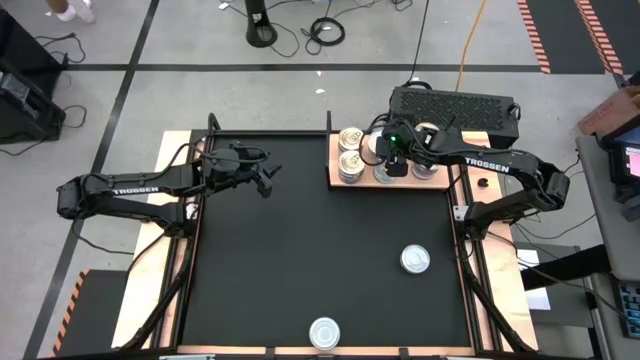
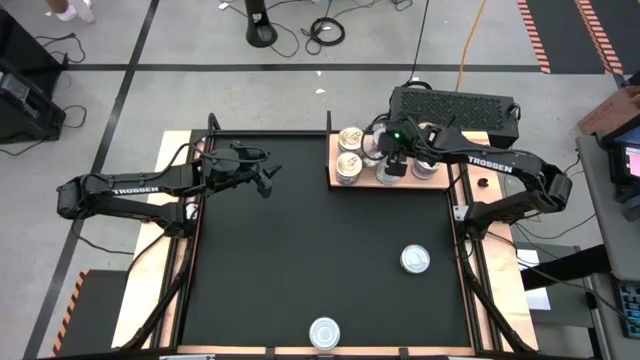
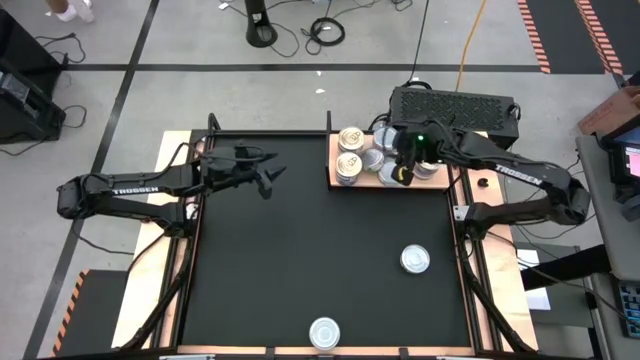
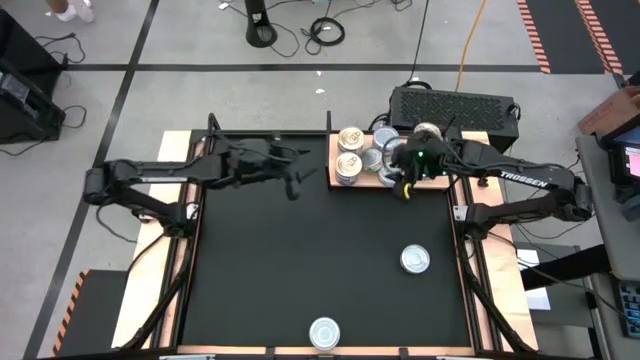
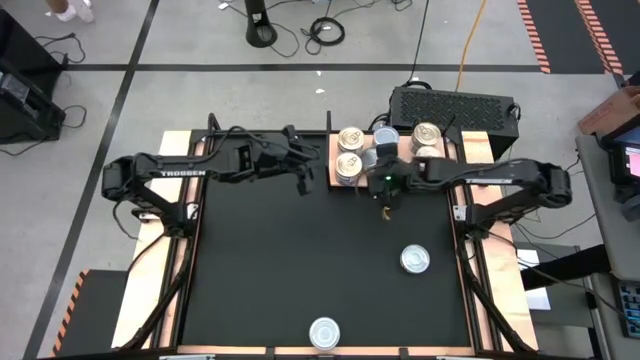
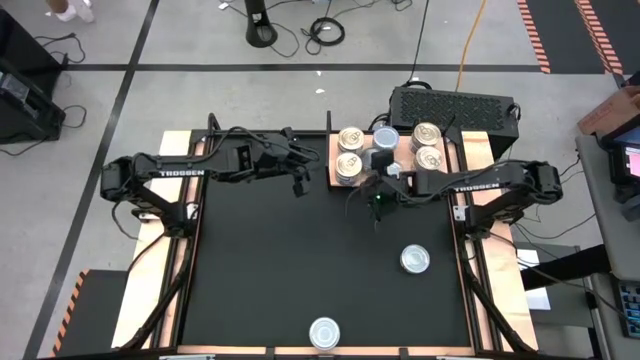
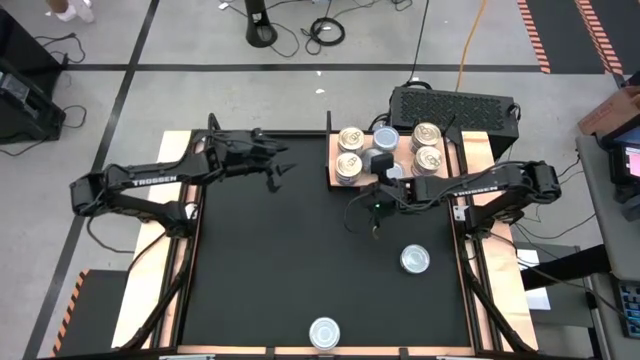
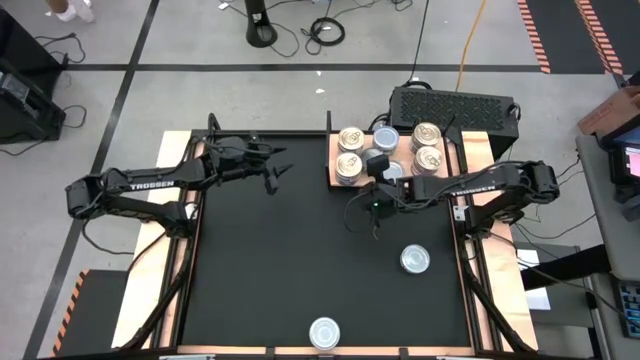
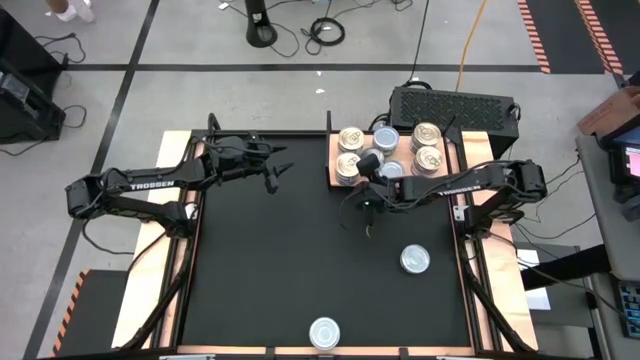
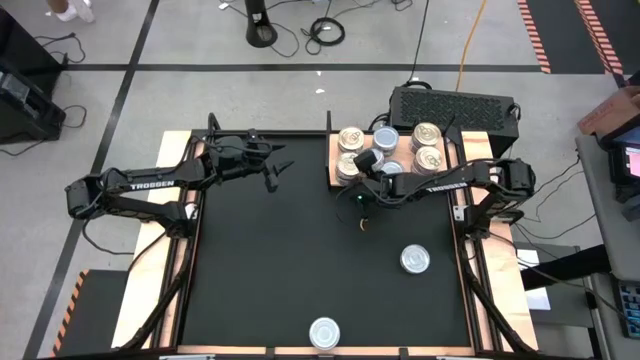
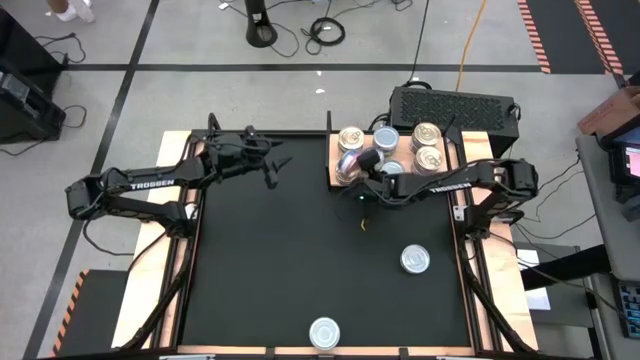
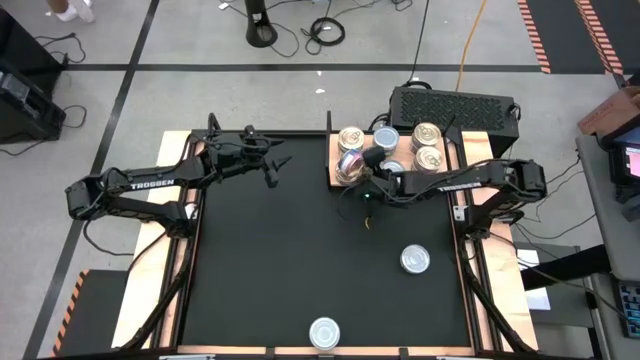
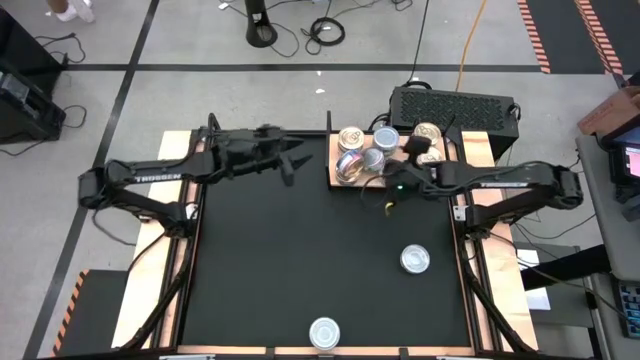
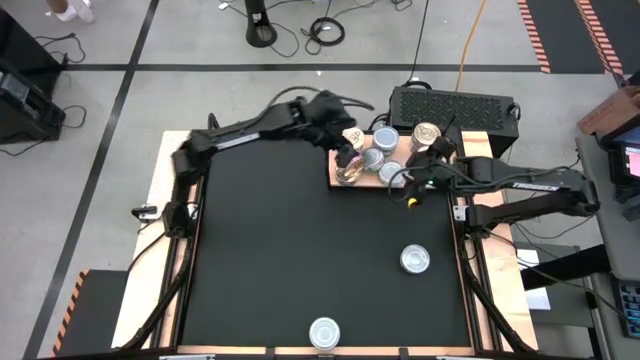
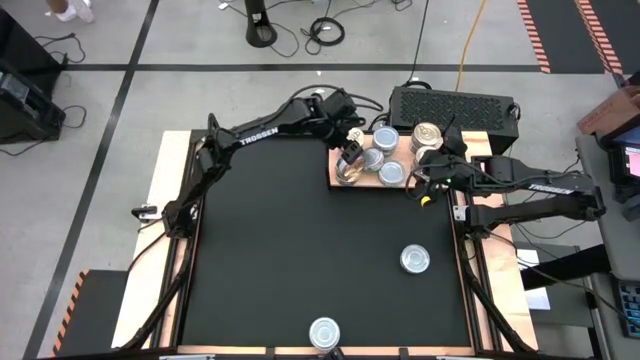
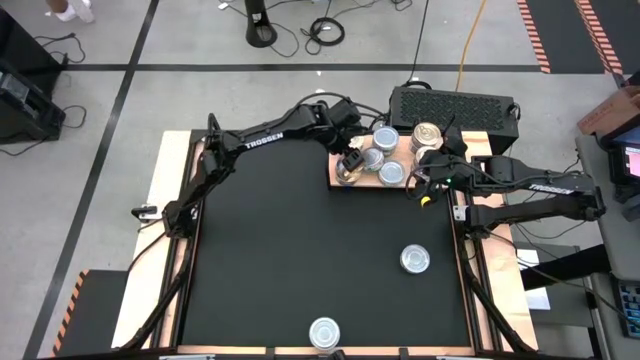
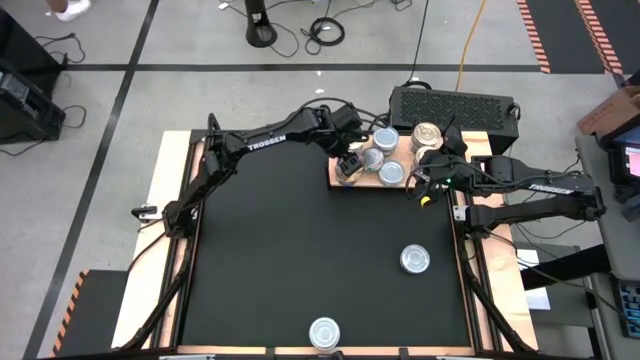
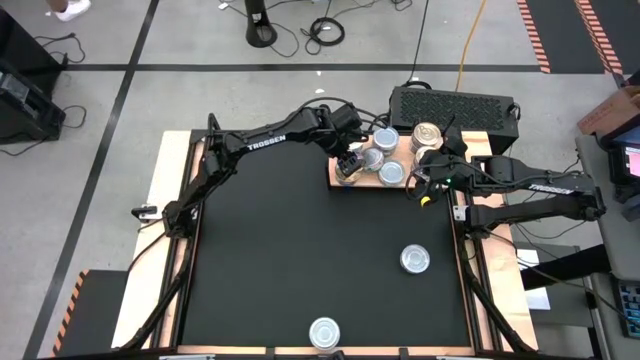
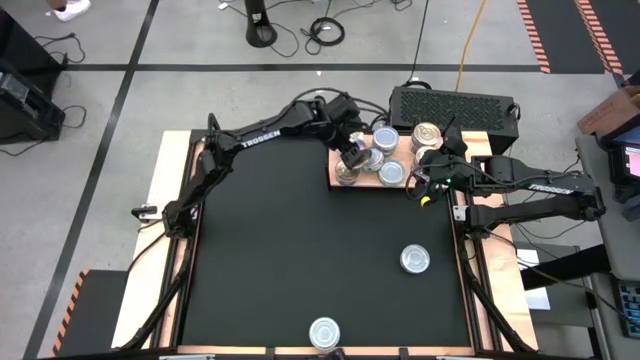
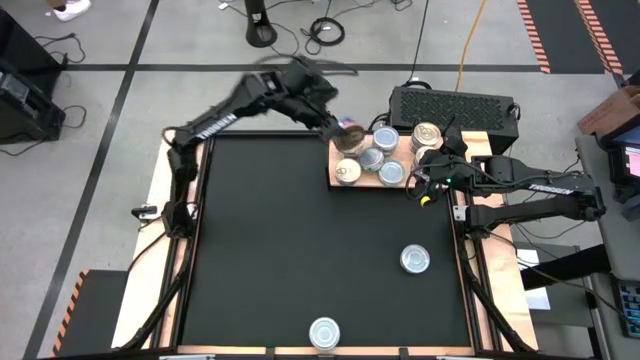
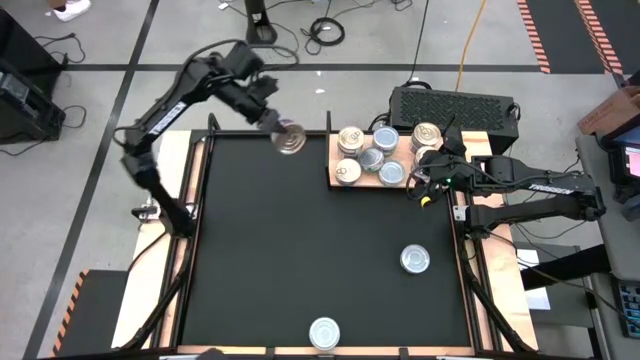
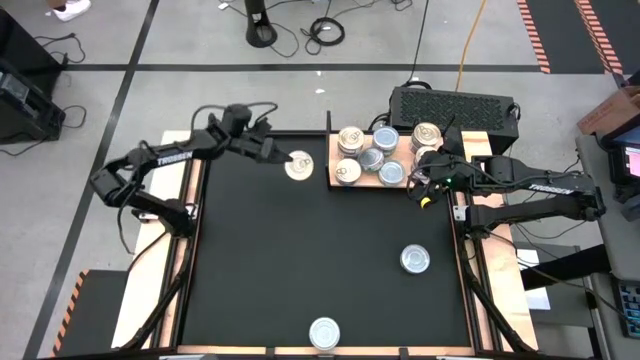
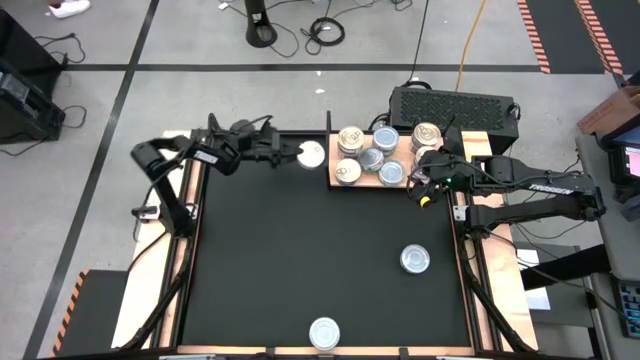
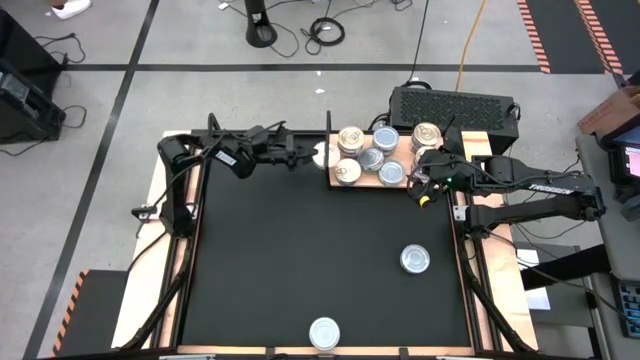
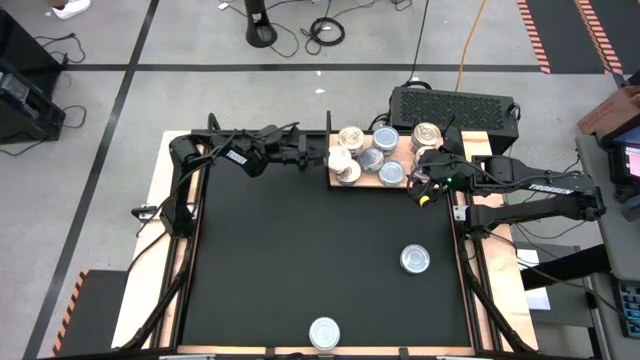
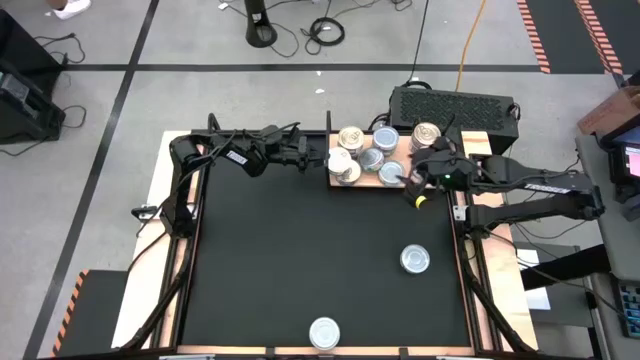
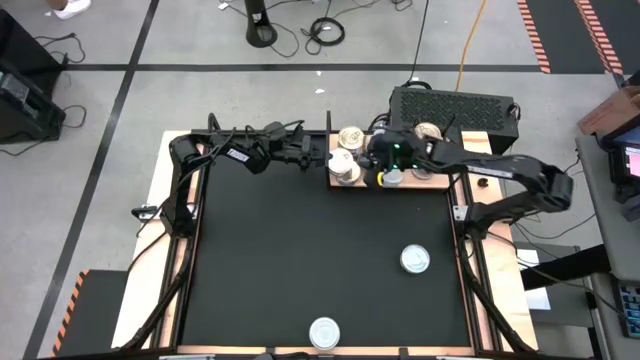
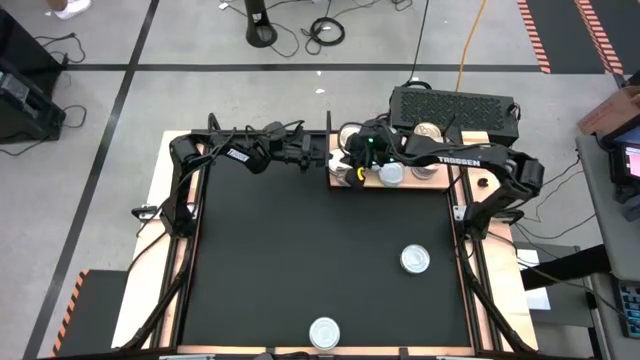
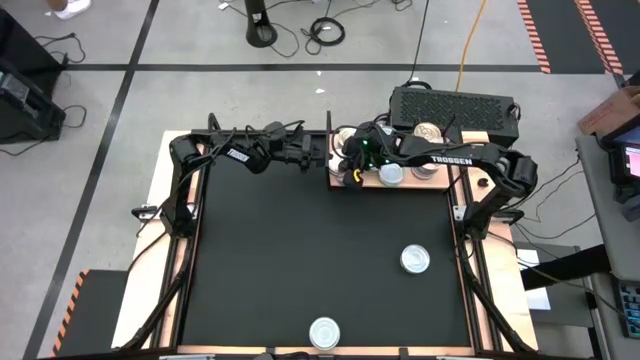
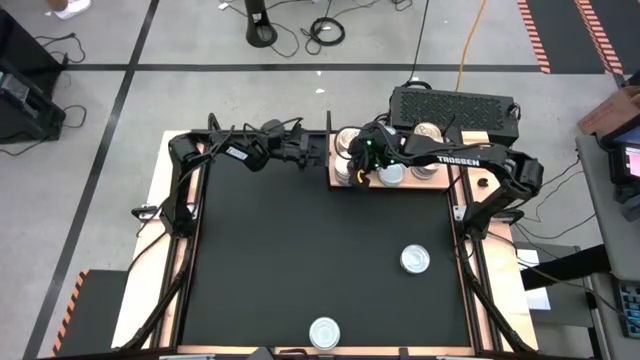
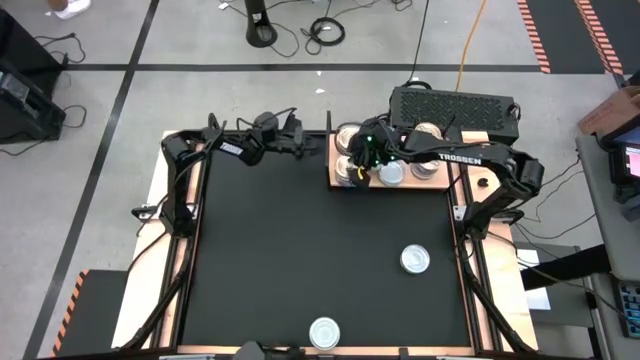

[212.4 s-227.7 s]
Task: Stack canned seafood by type on shelf
Adjust the blue pink tuna can on the shelf

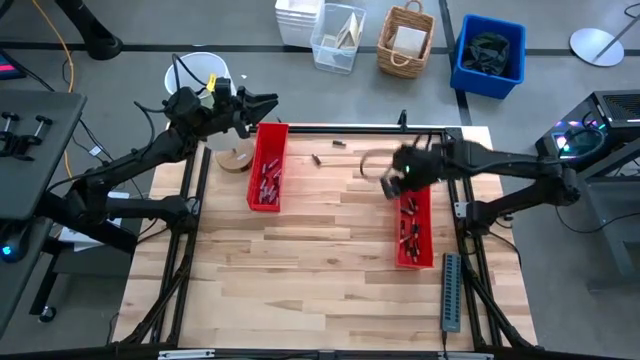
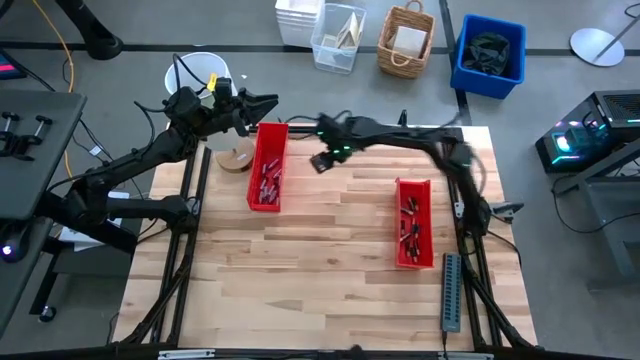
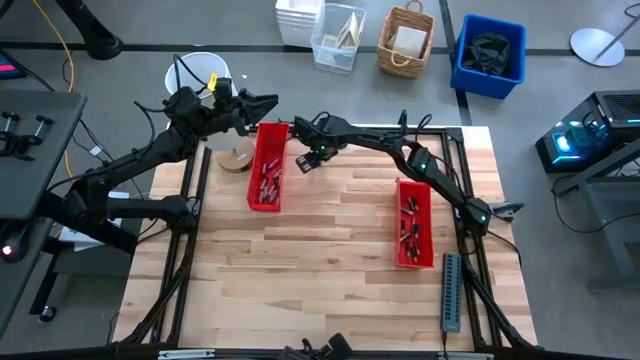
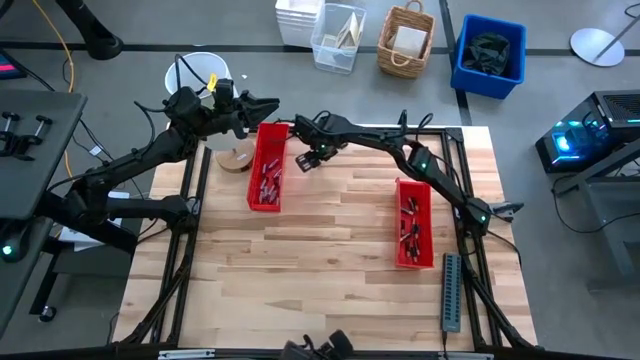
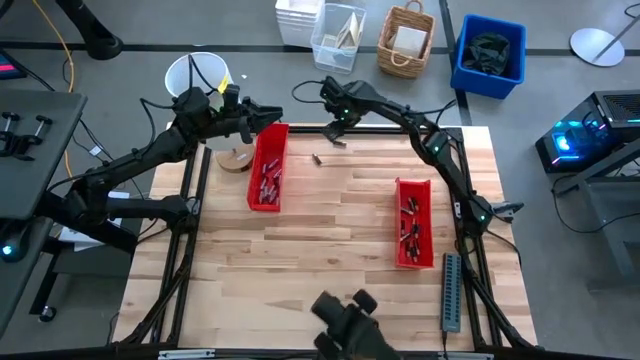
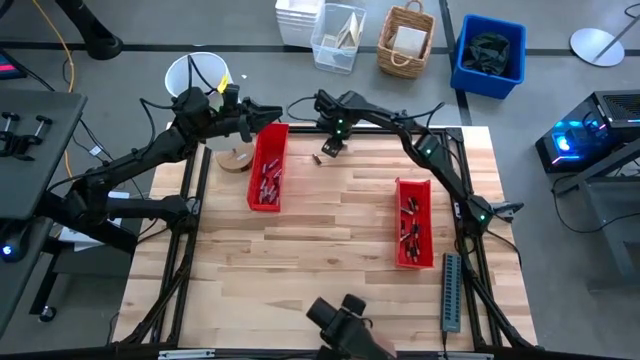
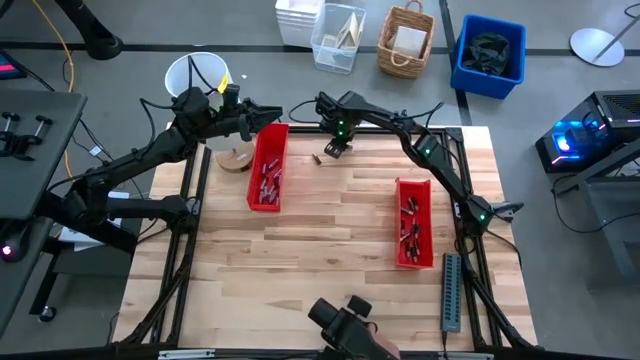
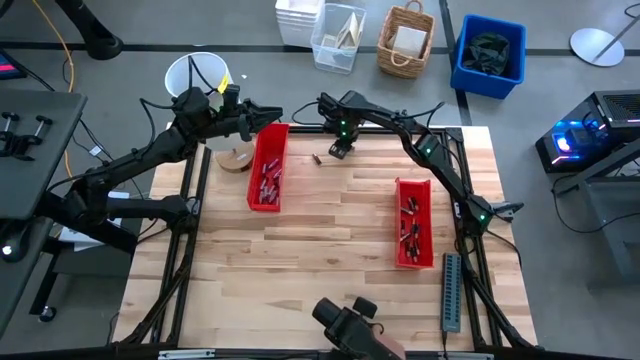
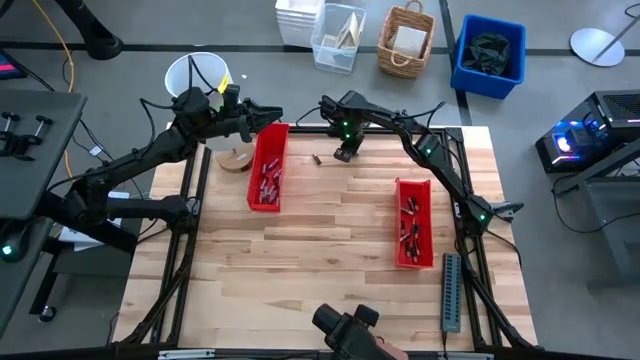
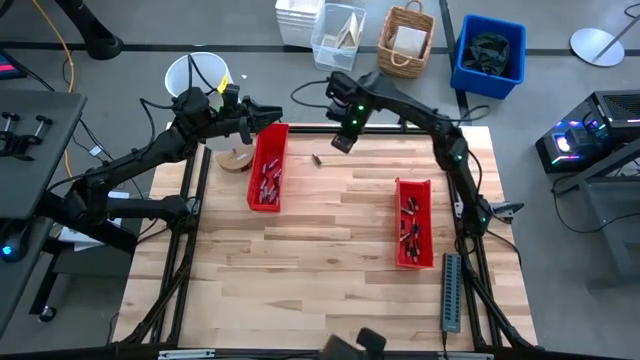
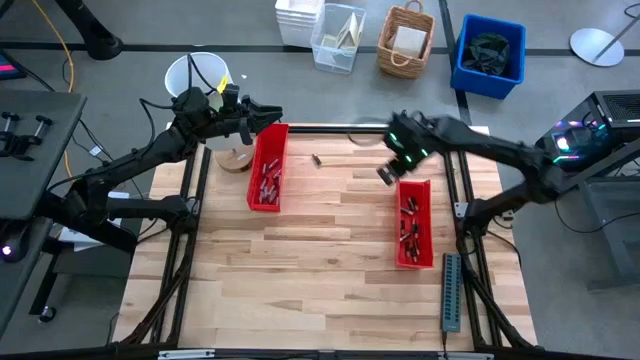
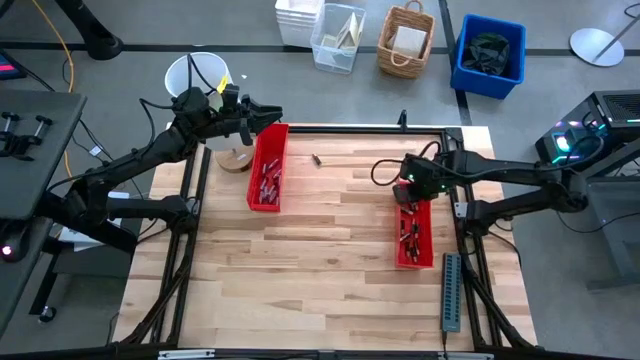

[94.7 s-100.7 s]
Task: Sort batteries
Put the black battery into the bottom red bin
